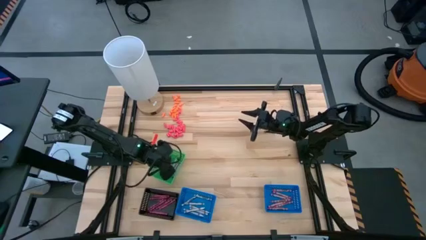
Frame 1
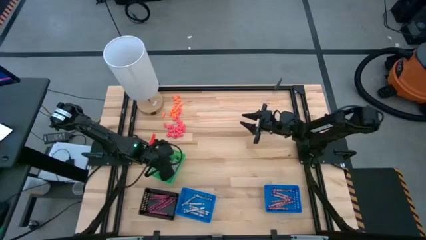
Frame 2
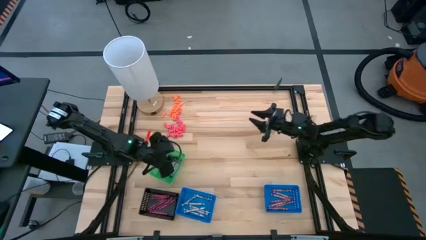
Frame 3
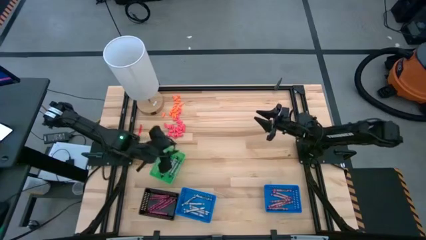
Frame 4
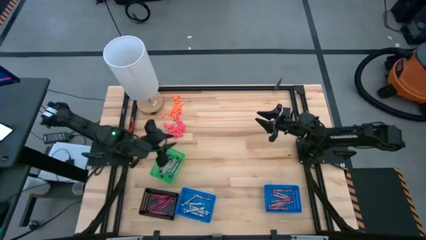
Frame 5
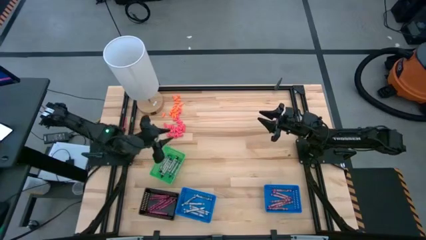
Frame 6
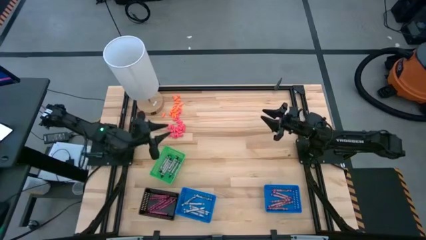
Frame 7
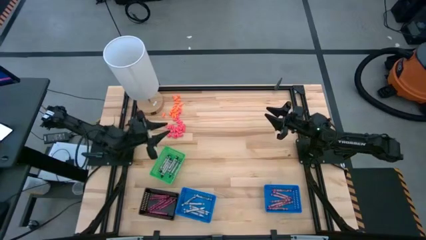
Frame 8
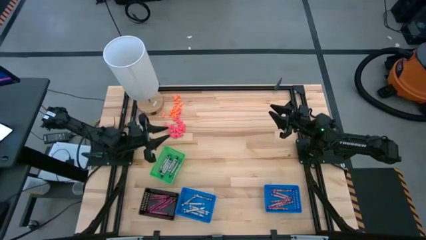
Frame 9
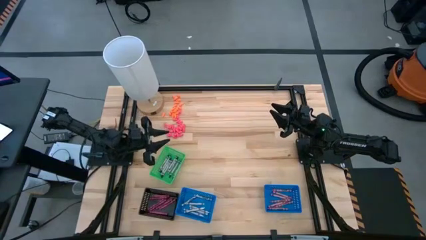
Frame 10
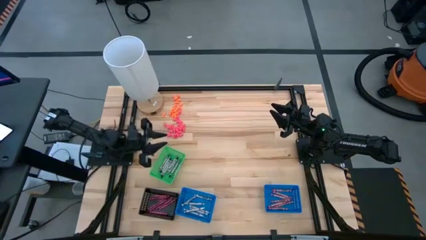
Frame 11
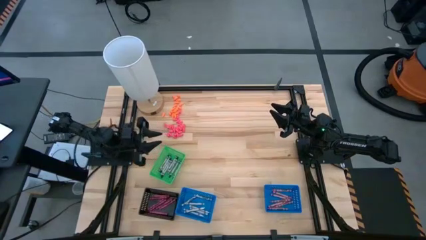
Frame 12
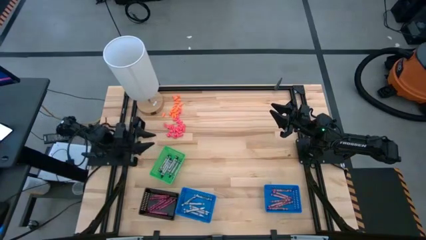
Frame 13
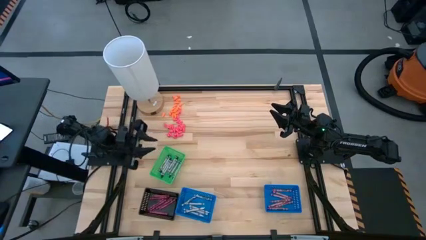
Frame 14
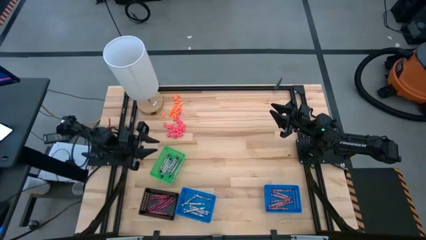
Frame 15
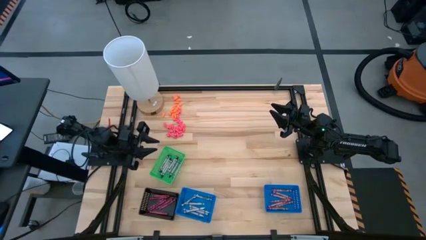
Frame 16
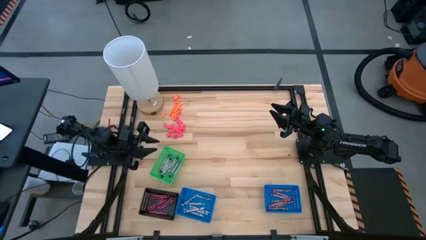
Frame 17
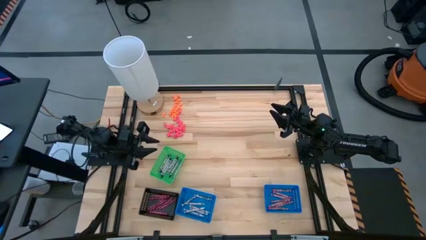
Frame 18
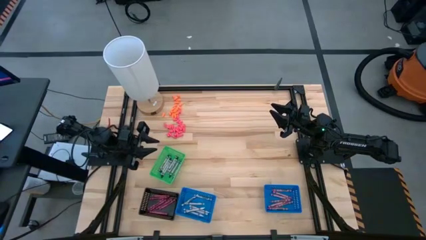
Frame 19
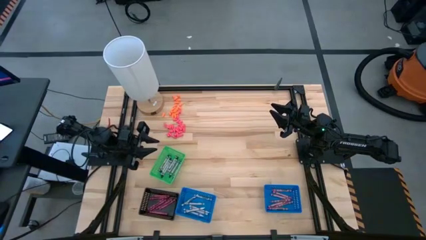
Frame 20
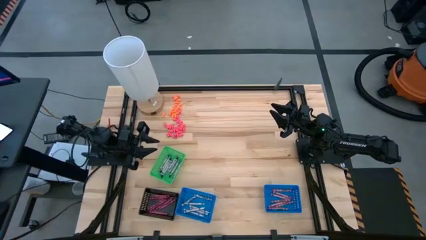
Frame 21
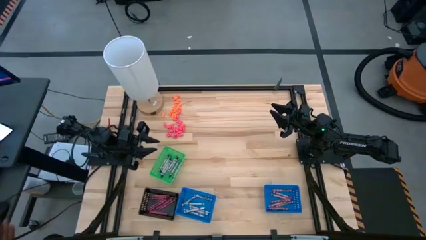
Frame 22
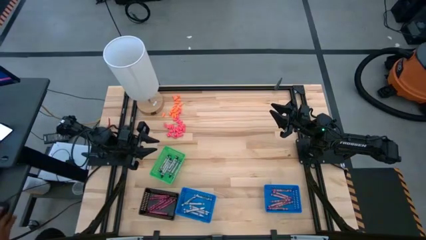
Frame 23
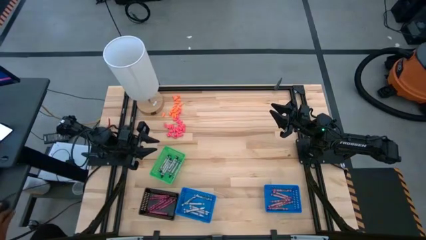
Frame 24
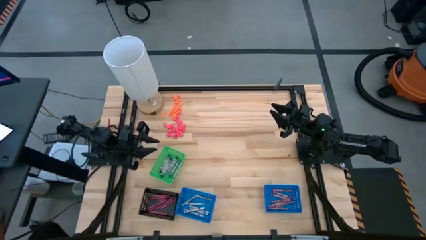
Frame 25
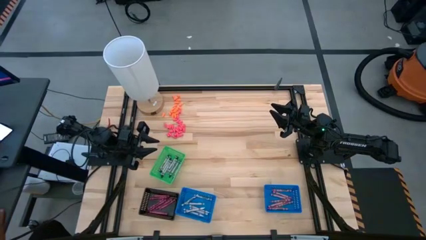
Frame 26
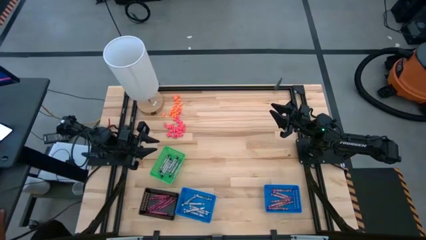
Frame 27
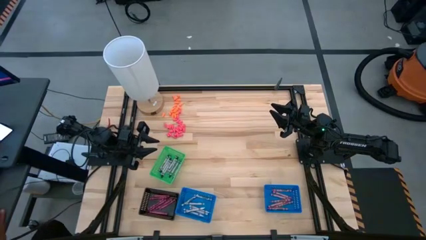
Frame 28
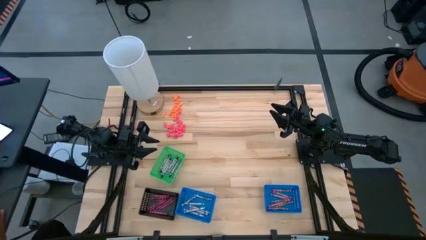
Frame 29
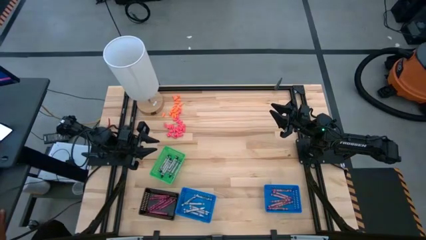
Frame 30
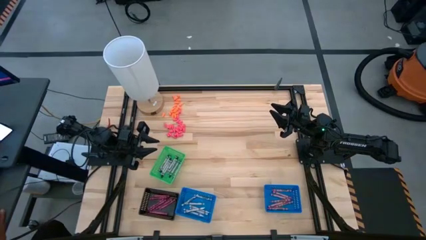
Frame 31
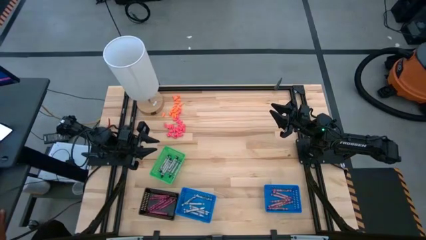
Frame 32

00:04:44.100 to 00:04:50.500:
Task: Sort crayons
Return to Home Position

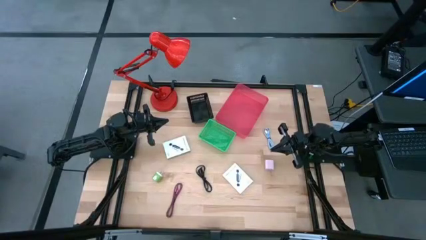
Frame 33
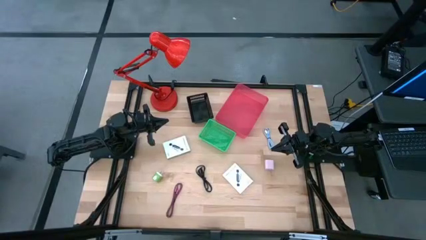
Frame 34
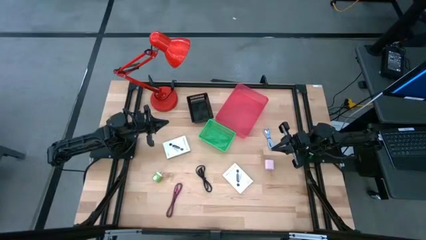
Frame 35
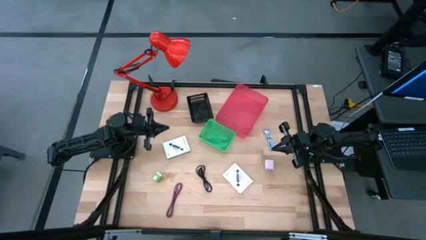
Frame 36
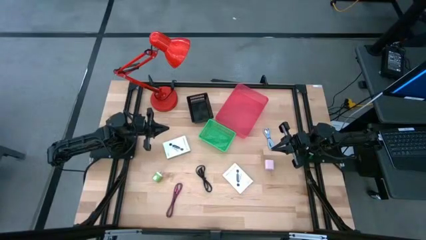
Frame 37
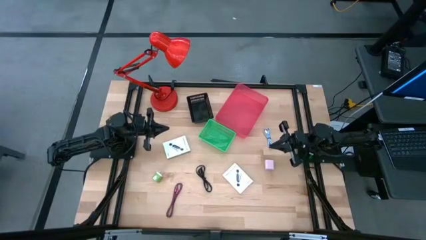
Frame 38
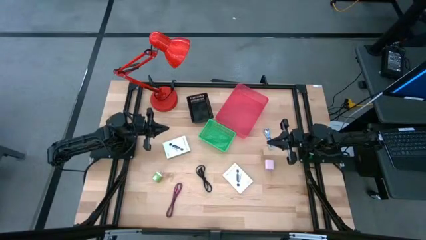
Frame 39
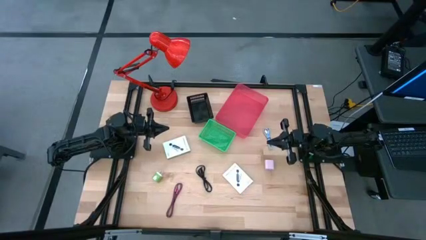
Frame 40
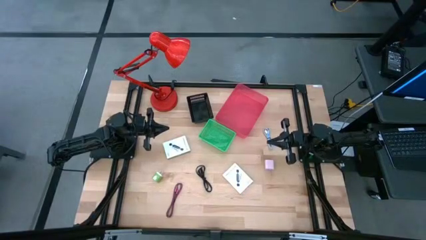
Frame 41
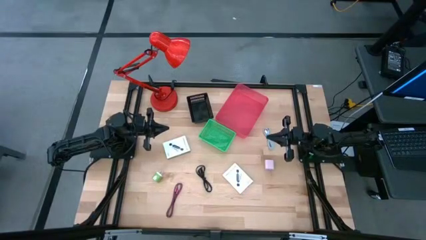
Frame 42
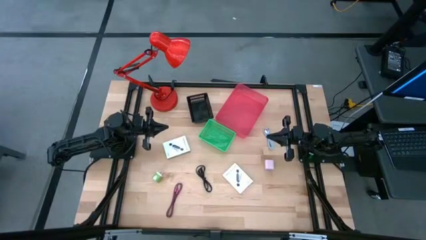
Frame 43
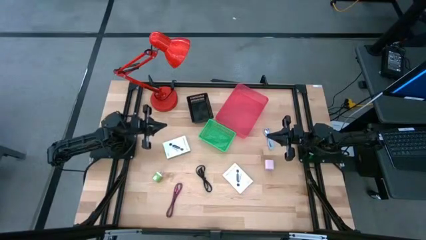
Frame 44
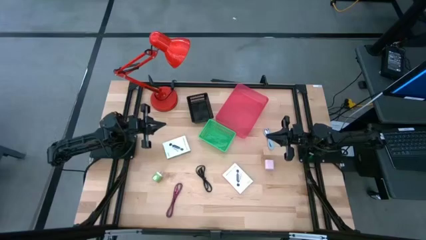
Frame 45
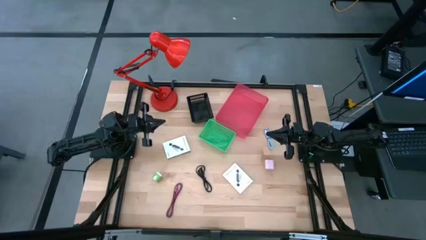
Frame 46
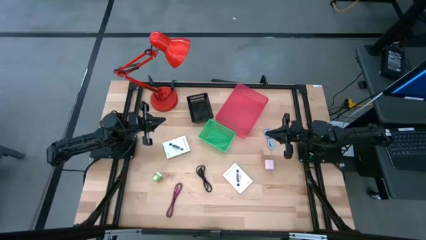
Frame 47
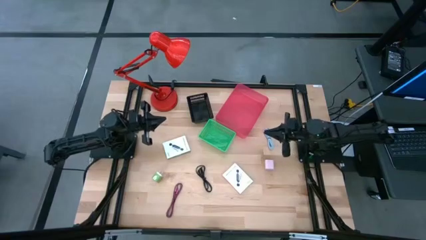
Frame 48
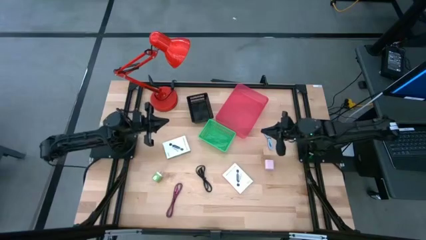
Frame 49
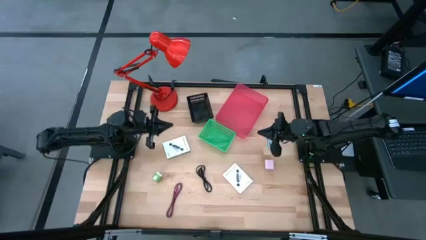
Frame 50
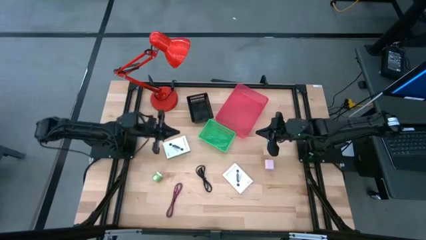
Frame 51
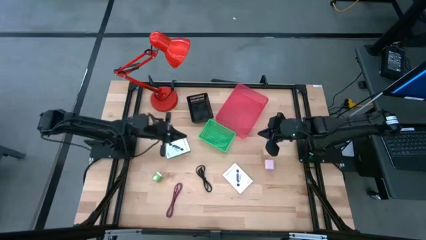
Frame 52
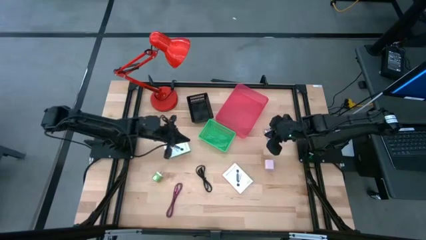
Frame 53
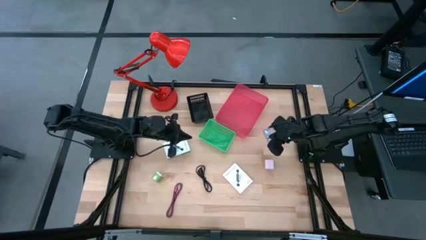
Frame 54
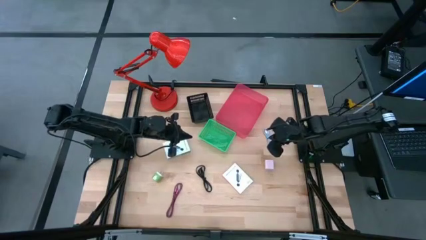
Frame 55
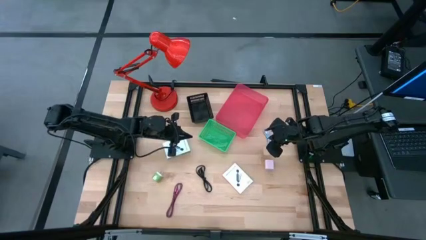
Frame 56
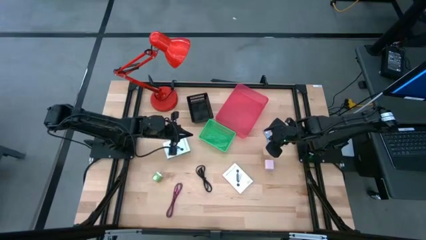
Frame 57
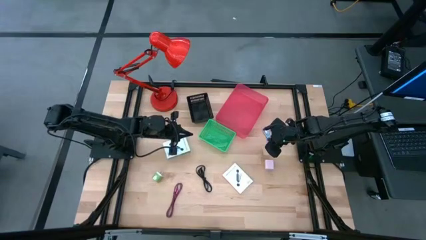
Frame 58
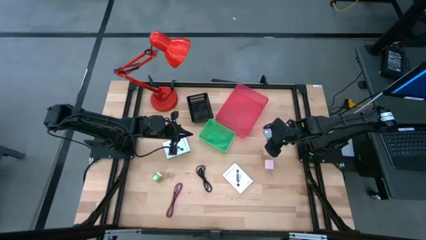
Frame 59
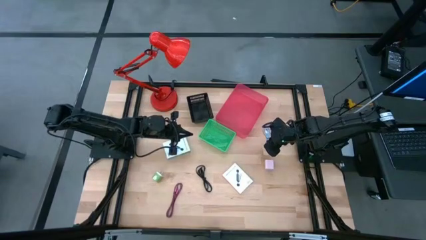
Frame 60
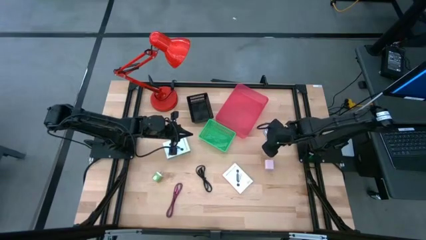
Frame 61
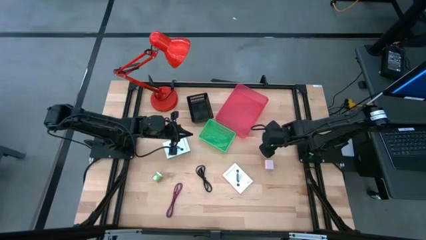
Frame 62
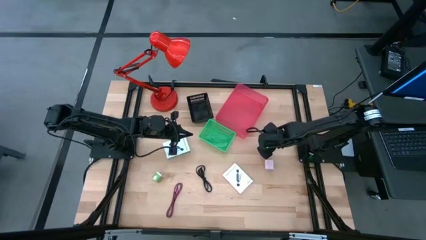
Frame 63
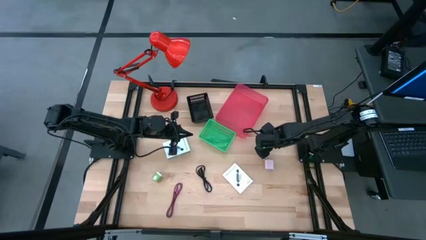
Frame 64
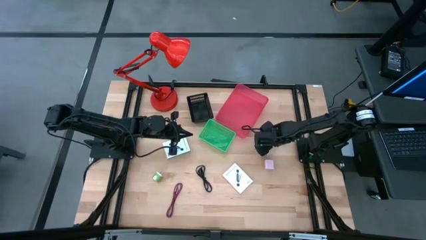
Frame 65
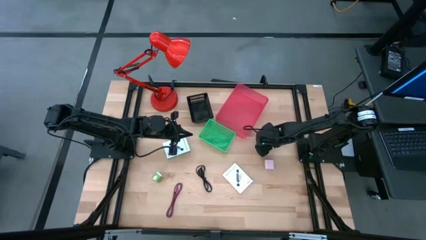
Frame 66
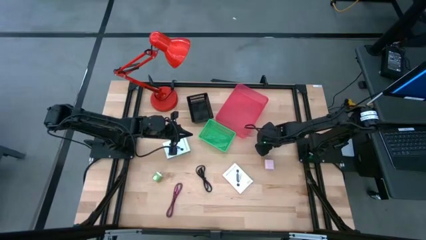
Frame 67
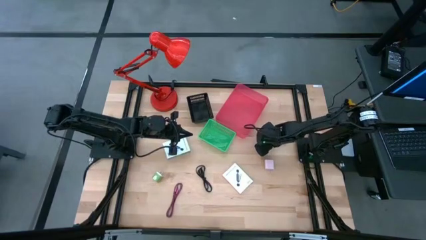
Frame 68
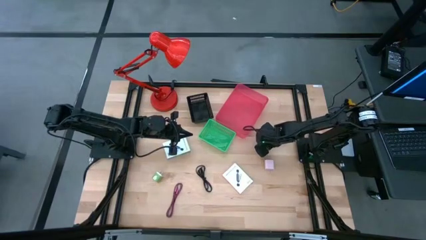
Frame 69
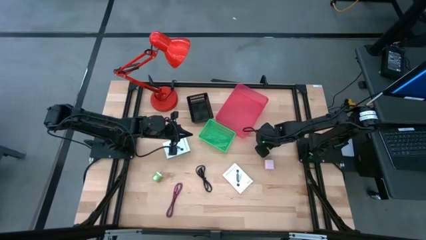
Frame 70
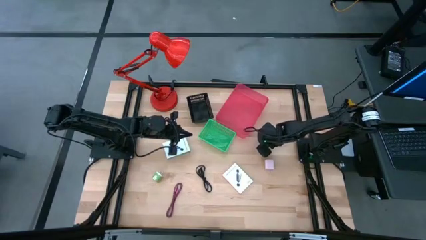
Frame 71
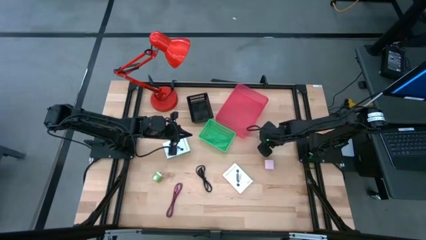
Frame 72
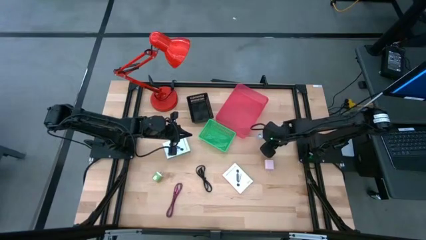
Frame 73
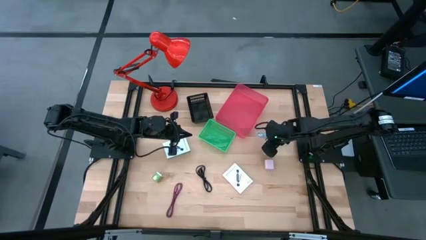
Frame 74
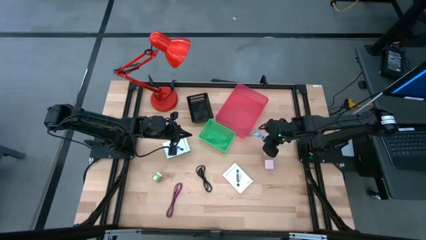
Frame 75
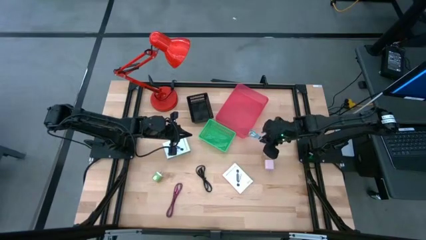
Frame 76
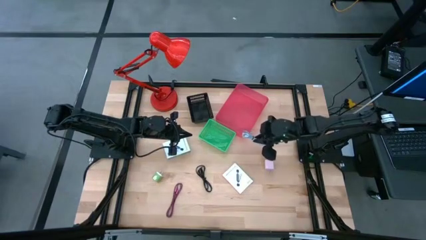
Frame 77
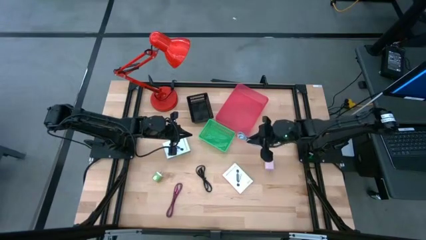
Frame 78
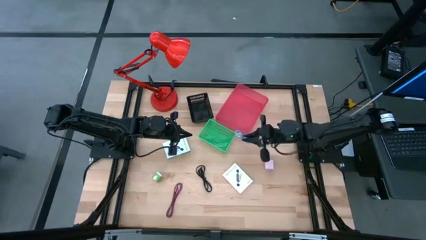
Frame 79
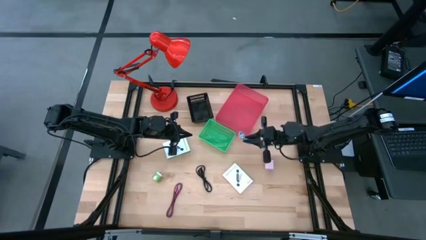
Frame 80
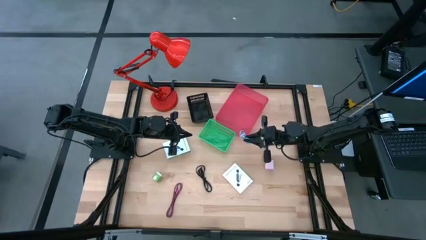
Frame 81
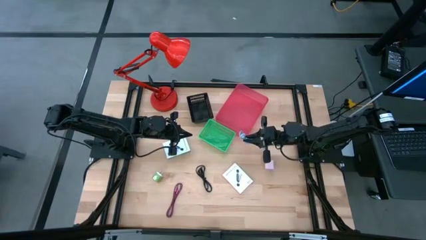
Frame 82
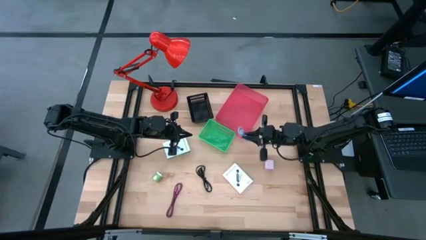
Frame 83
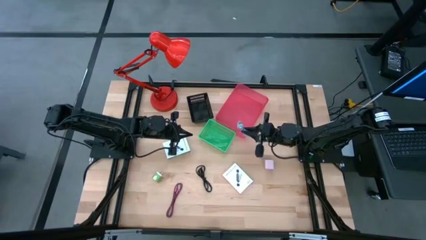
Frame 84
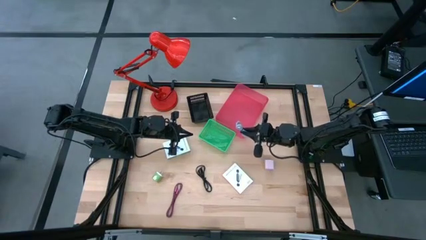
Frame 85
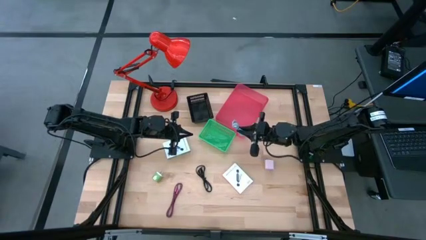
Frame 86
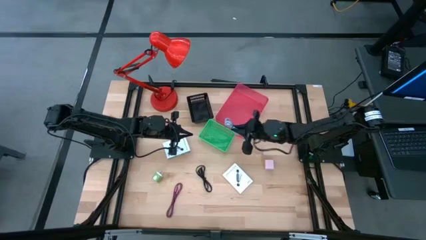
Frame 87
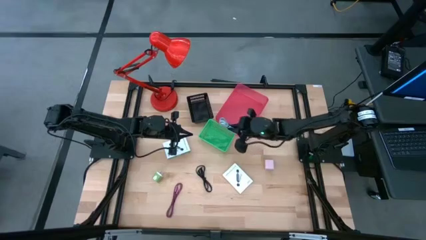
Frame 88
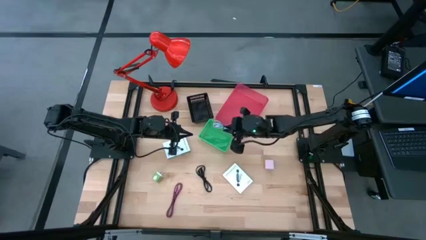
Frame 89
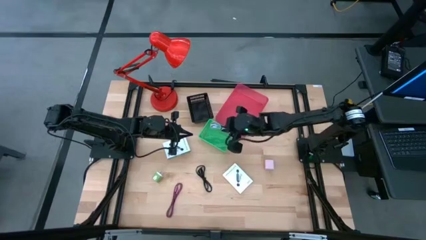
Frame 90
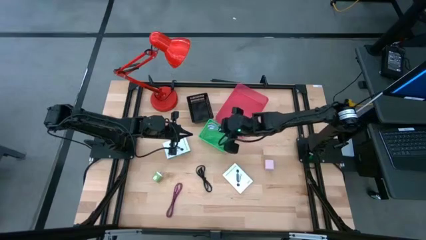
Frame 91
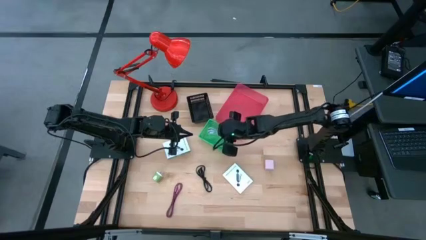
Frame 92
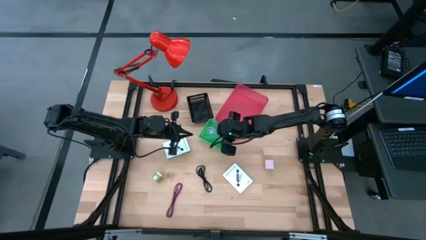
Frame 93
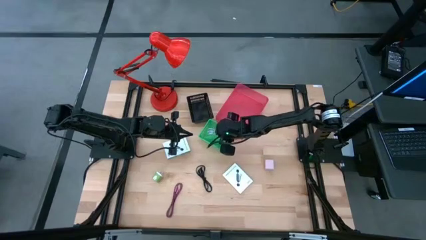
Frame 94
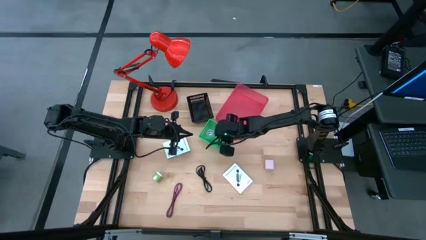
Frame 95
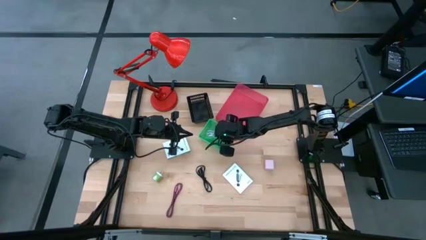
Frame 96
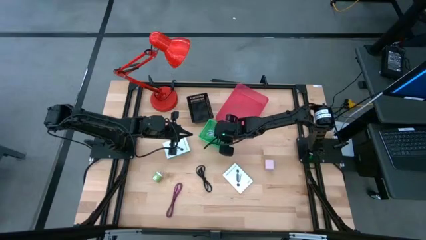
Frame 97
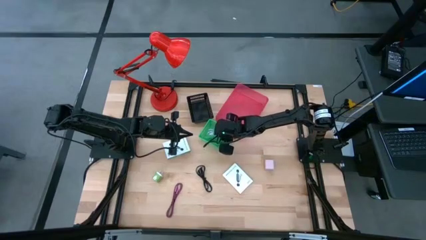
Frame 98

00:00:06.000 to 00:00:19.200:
Task: Pick and place items into bin
Put the gray charger cable into the green bin
